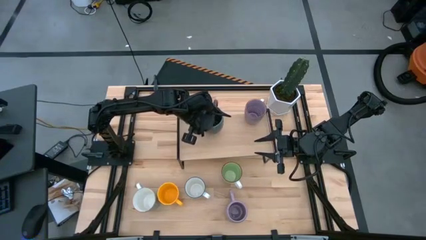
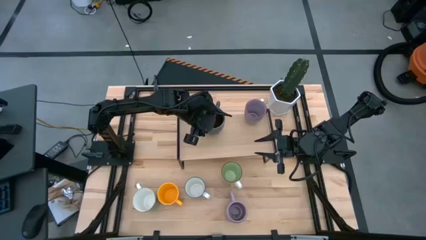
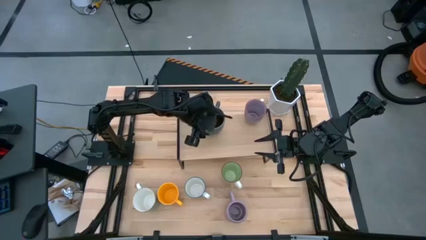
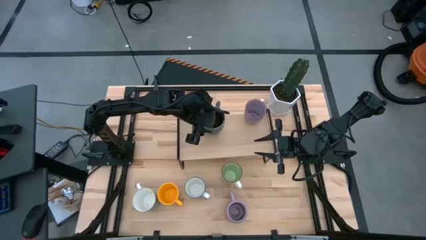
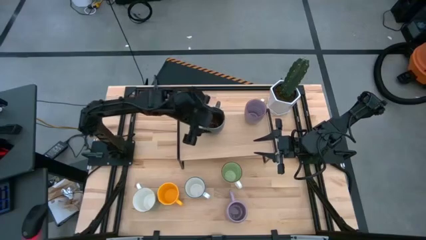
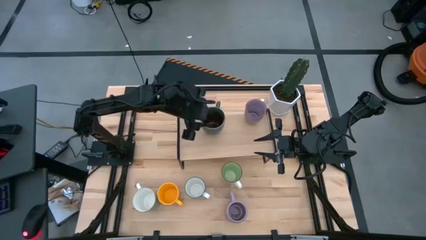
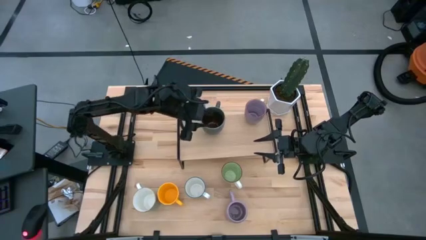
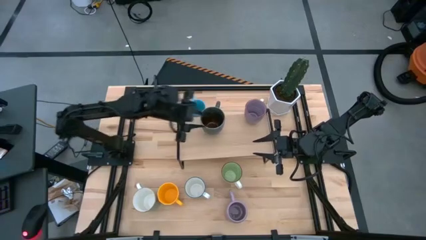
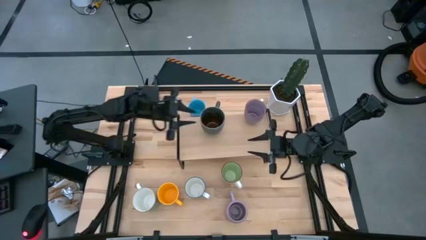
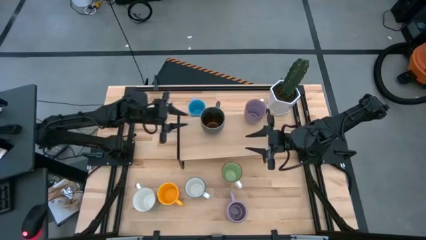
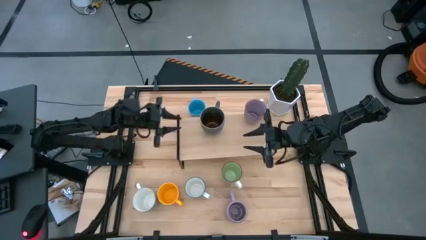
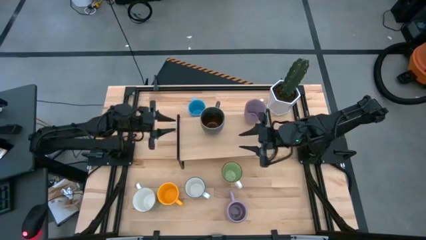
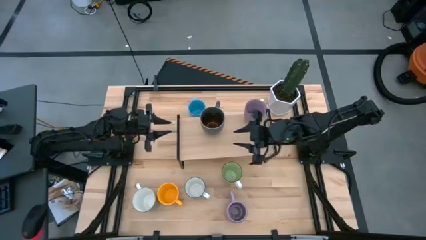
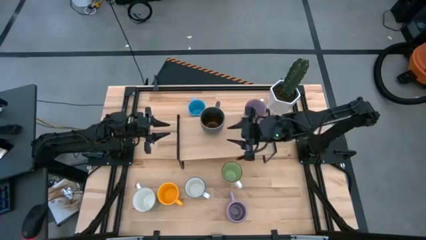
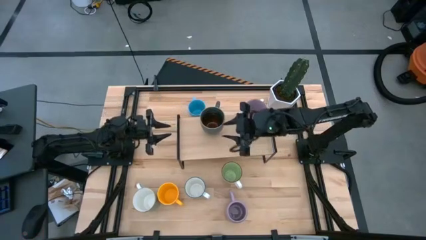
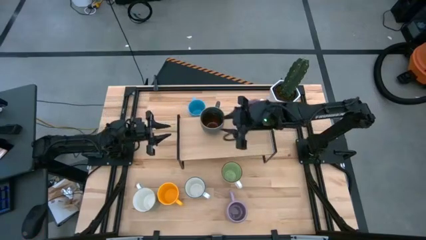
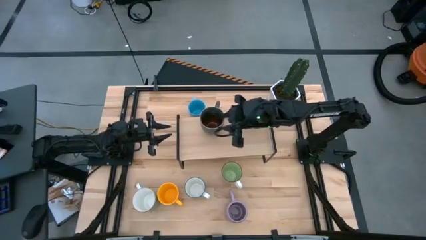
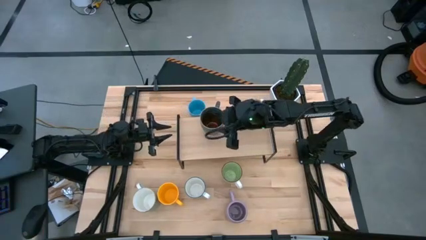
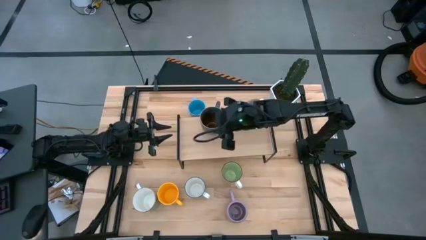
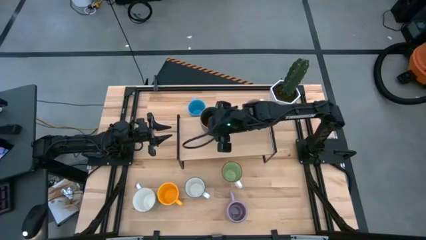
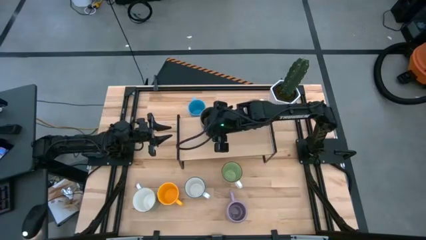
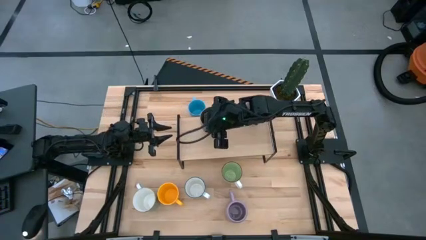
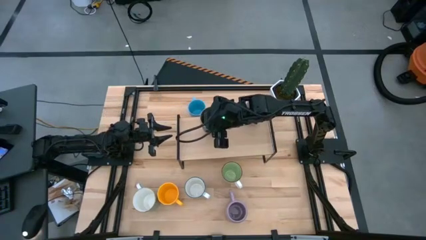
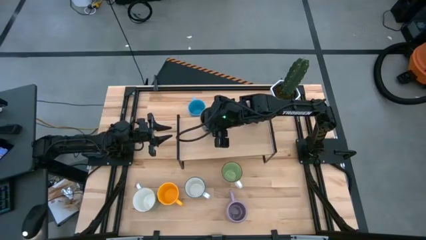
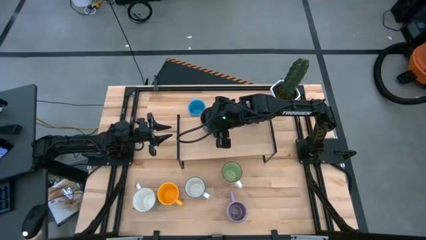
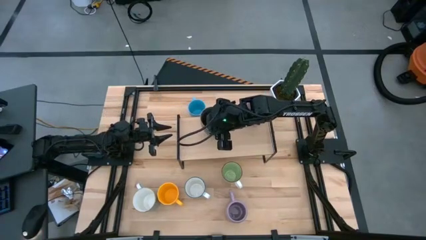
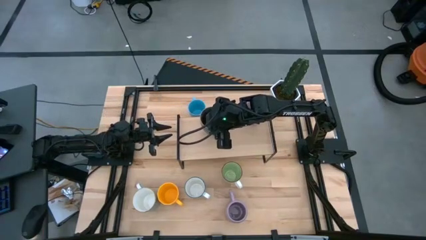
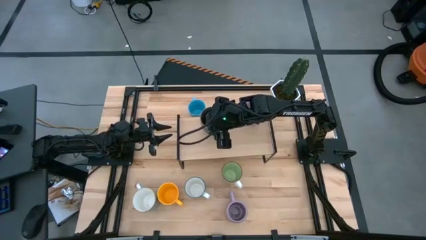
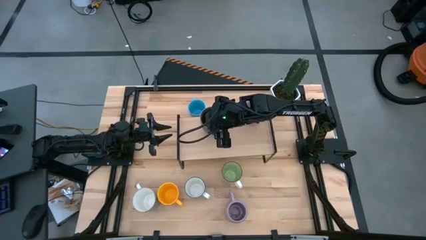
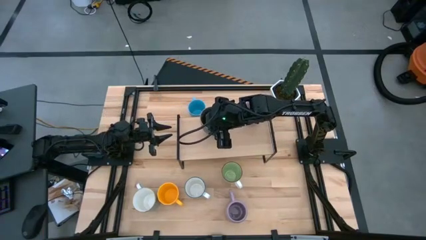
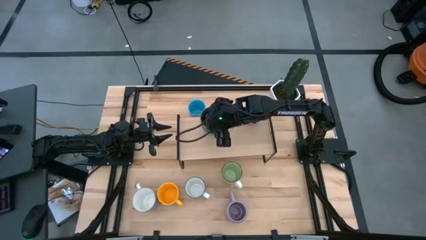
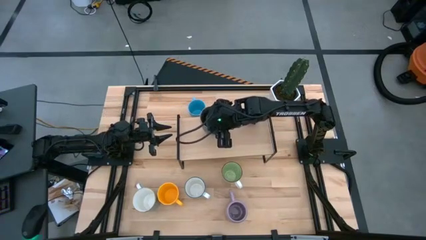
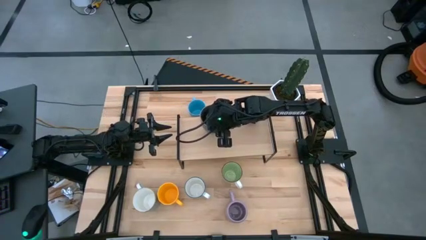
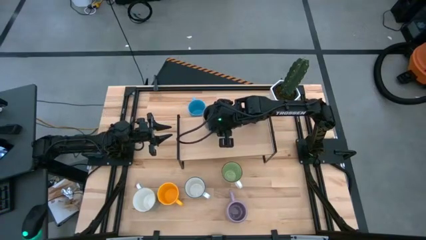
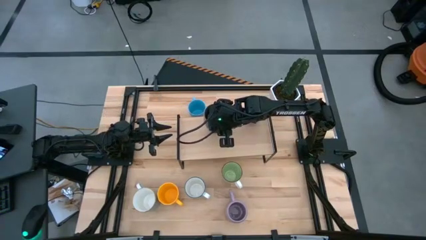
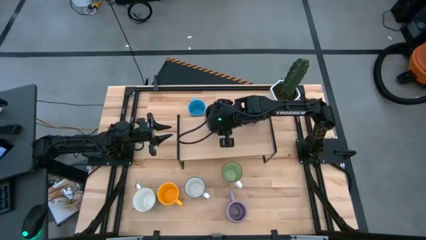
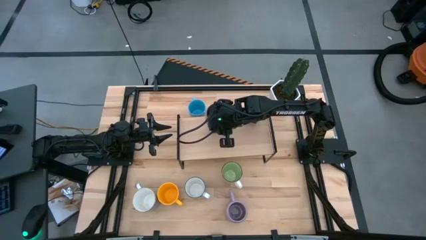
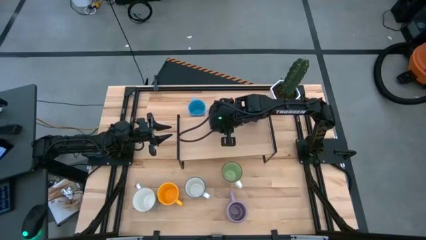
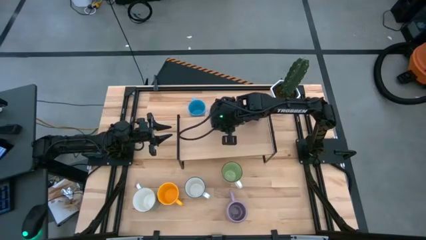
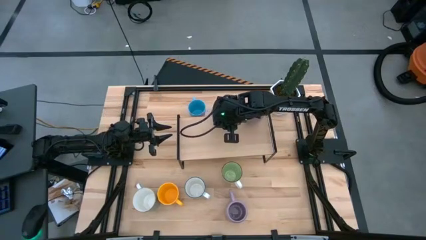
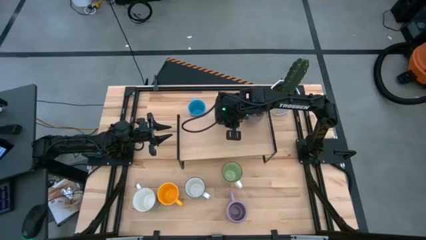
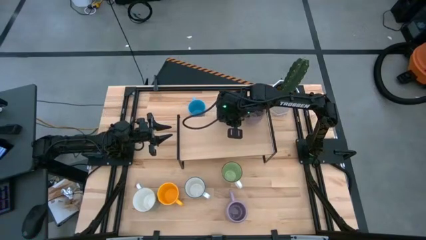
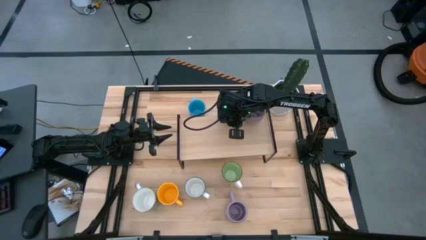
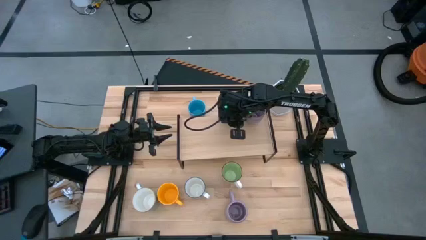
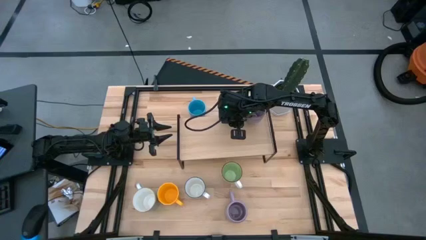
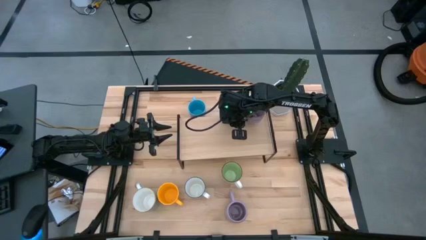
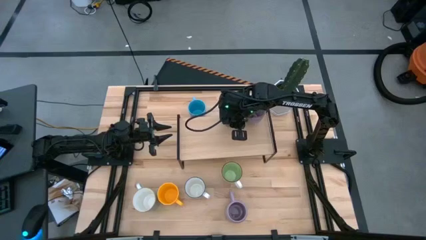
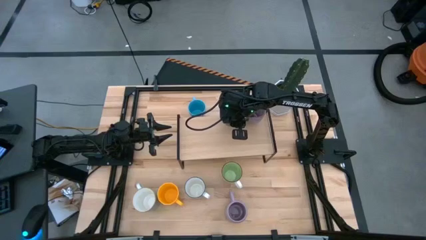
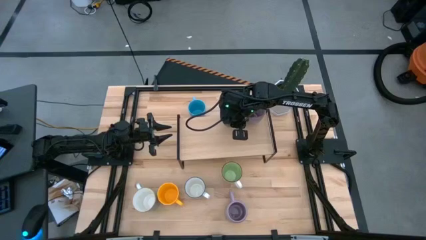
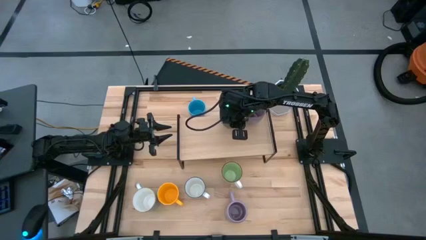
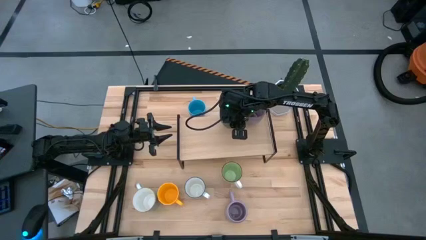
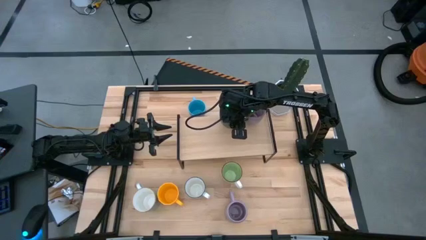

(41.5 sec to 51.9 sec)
Task: Place coffee mugs
Put the green-brown mug on the shelf
